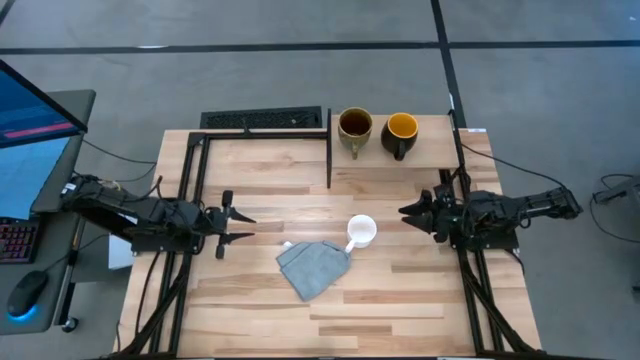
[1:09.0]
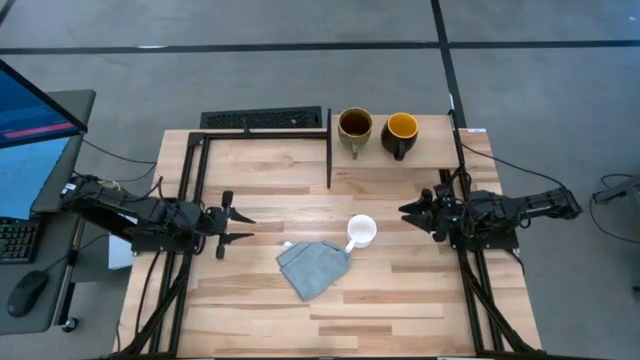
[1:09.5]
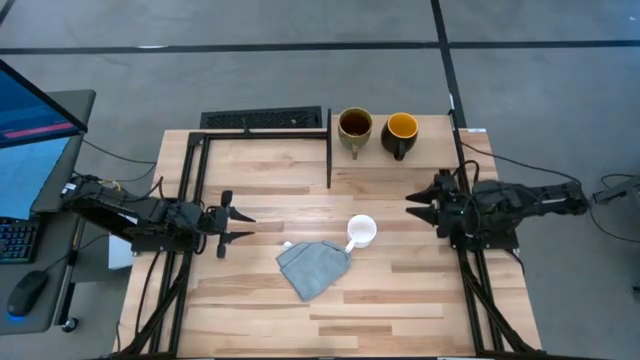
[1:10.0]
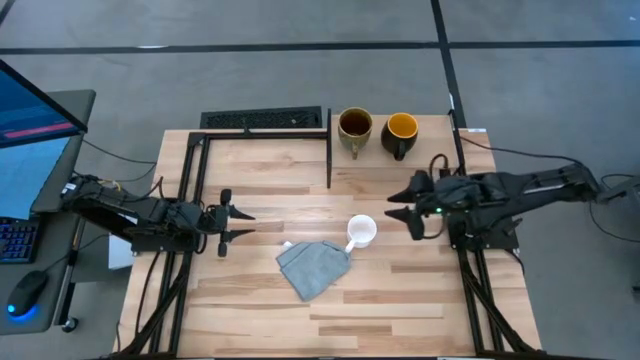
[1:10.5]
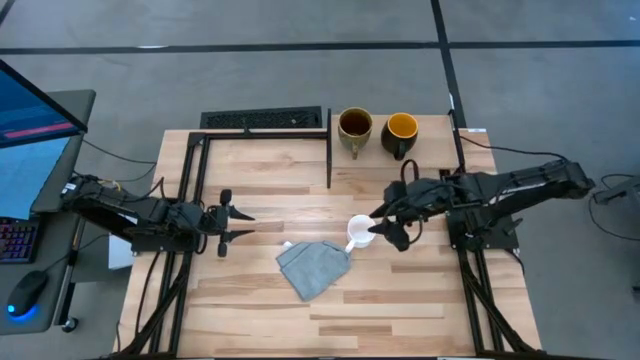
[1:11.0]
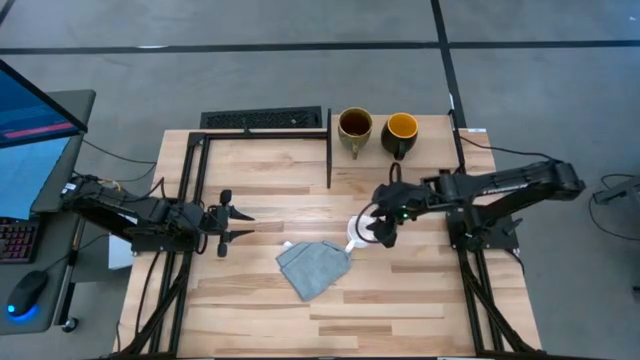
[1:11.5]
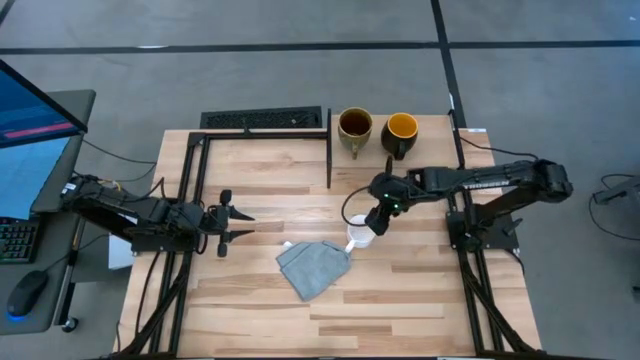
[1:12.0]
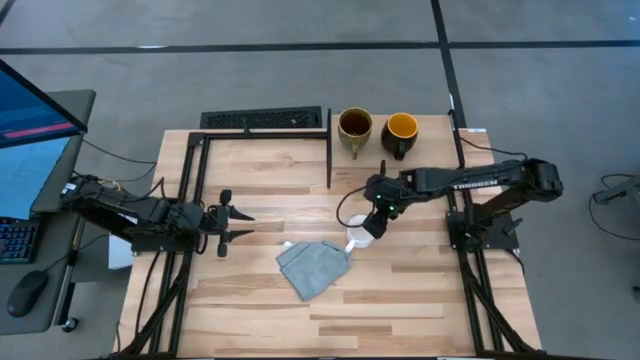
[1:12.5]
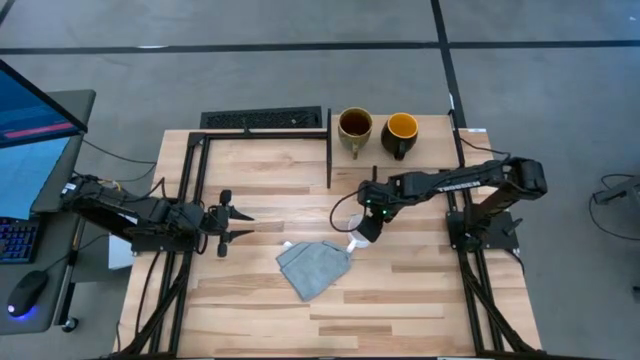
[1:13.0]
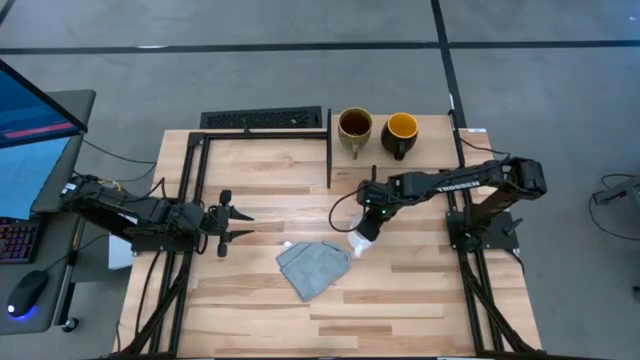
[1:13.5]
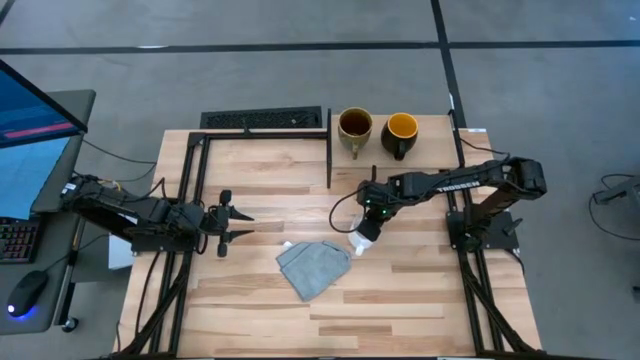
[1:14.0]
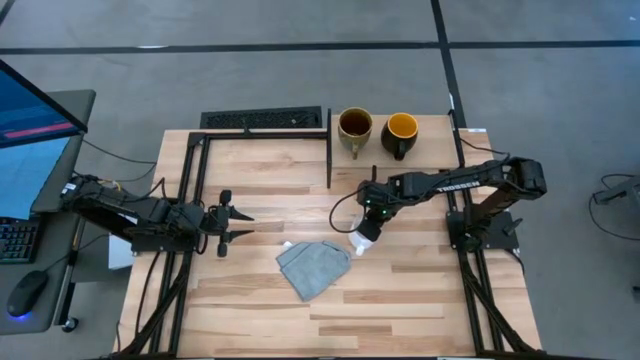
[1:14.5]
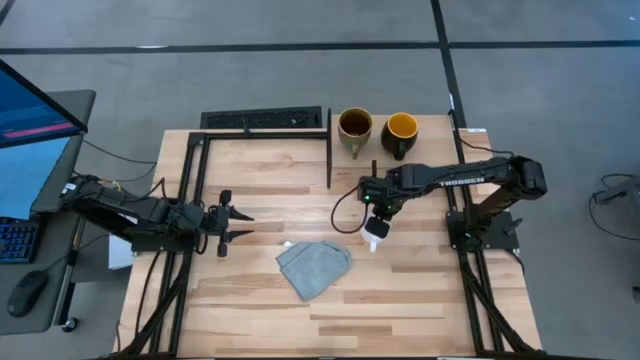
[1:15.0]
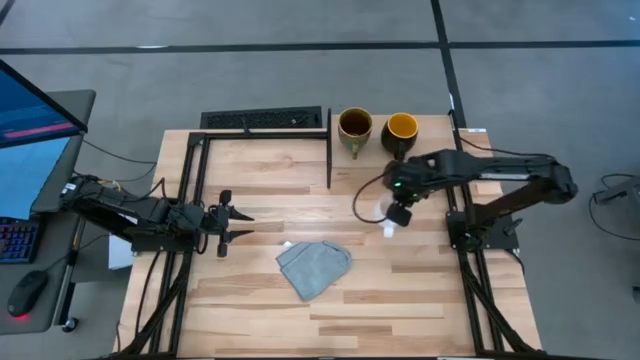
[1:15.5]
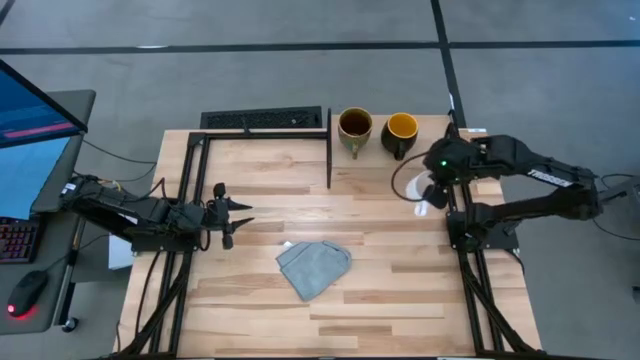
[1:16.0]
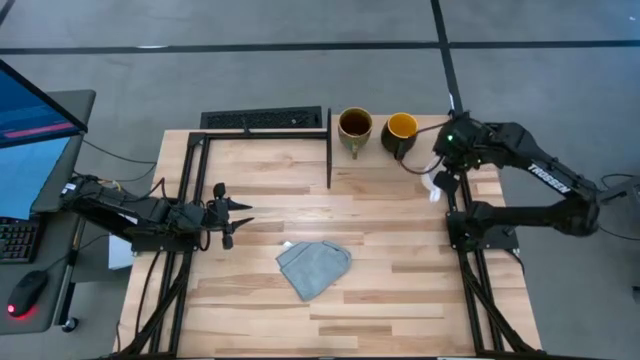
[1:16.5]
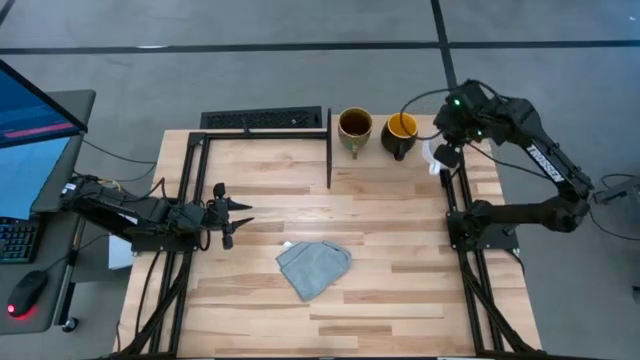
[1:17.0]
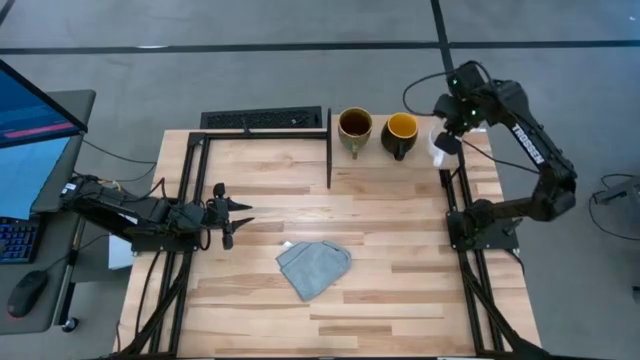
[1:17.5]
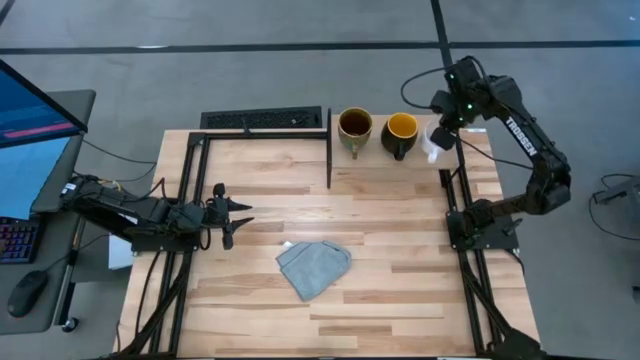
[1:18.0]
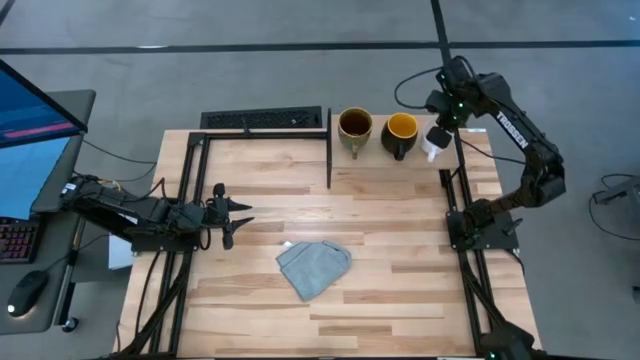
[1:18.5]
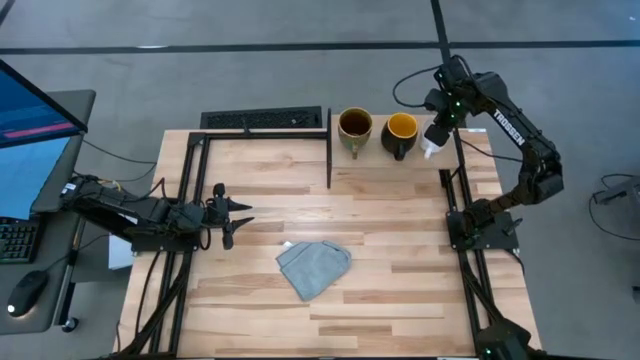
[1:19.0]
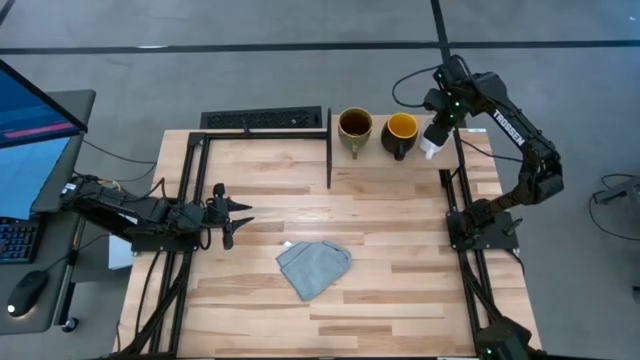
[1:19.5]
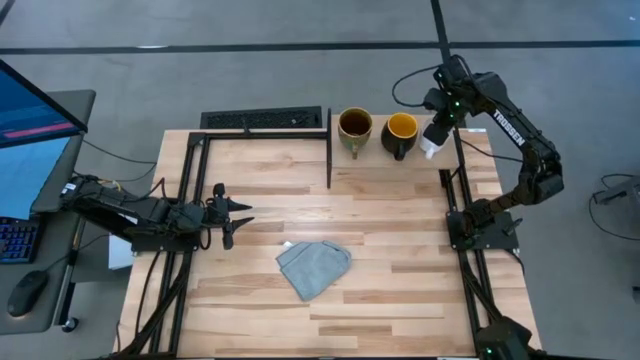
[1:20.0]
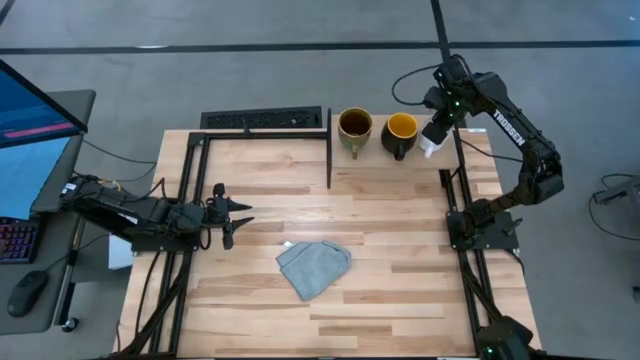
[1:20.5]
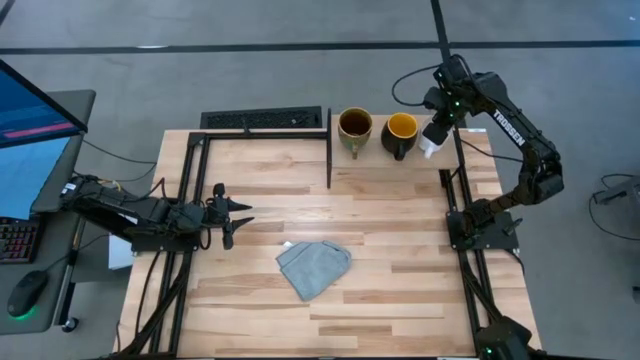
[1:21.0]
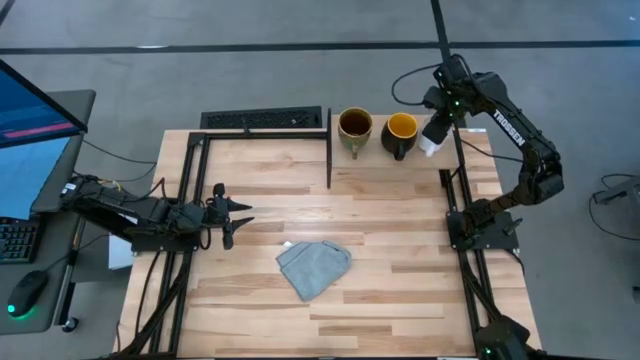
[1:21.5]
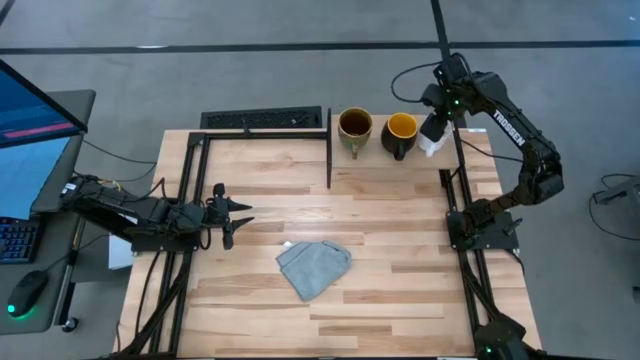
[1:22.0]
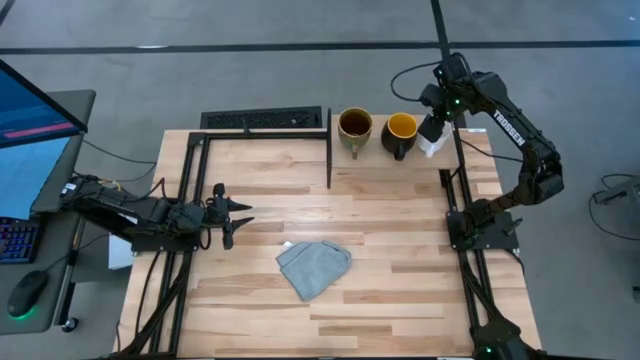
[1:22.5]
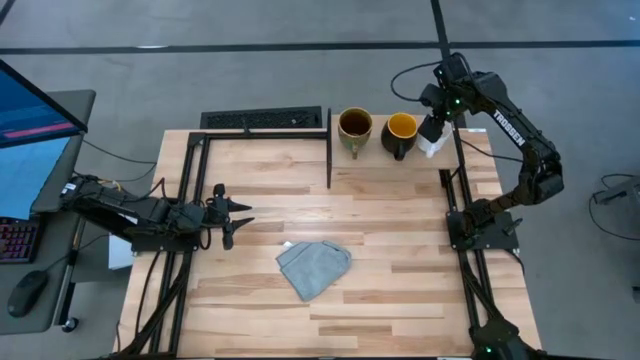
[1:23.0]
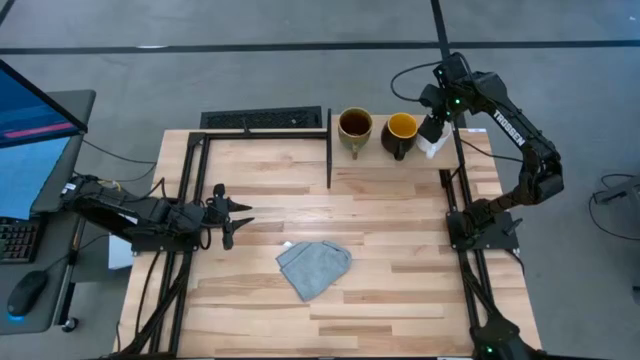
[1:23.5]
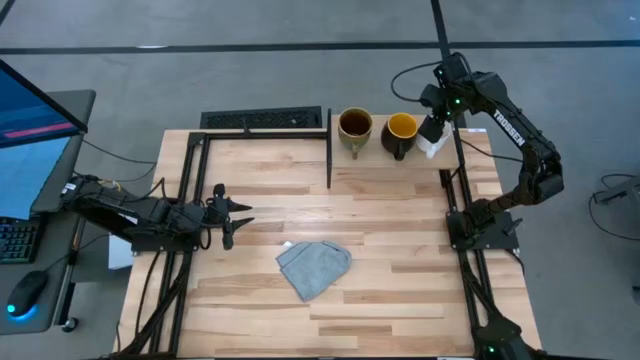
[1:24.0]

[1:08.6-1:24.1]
Task: Stack small to large cups/mugs on shelf
Put the white mug on the shelf

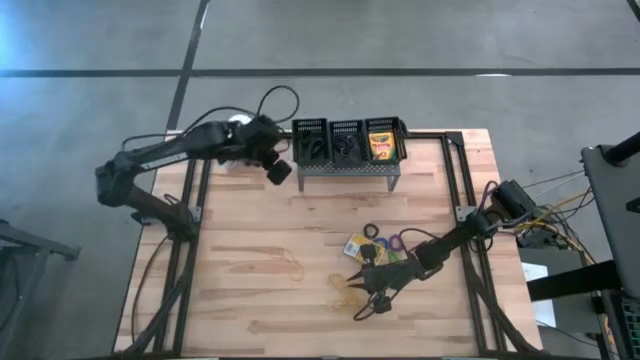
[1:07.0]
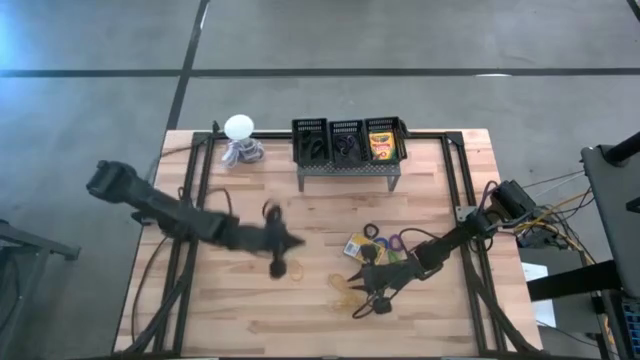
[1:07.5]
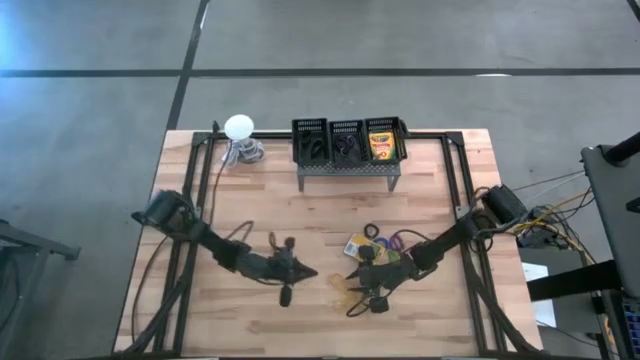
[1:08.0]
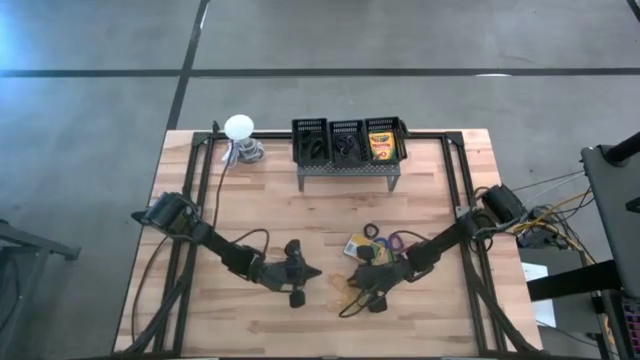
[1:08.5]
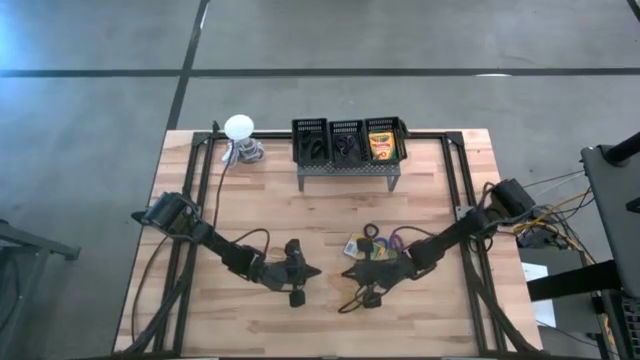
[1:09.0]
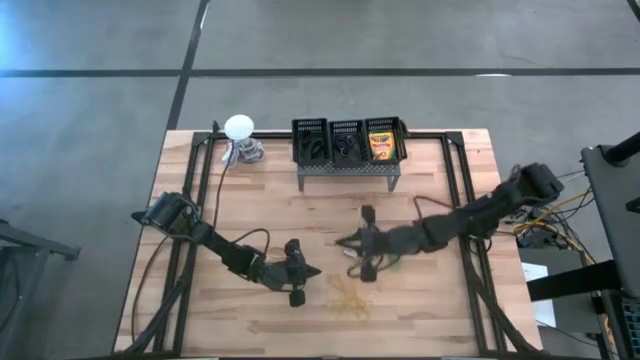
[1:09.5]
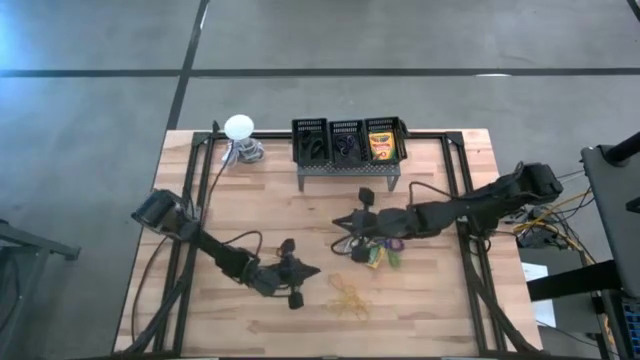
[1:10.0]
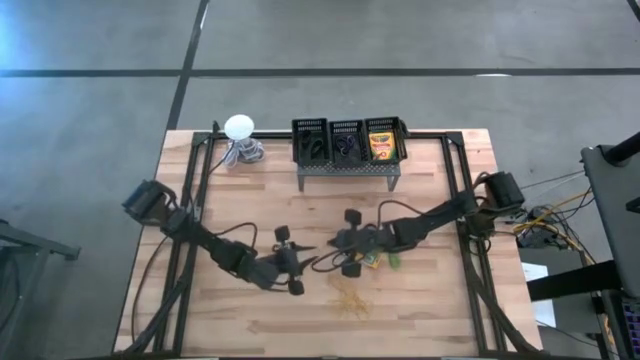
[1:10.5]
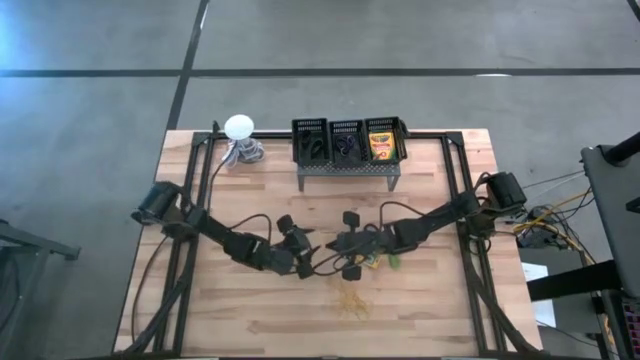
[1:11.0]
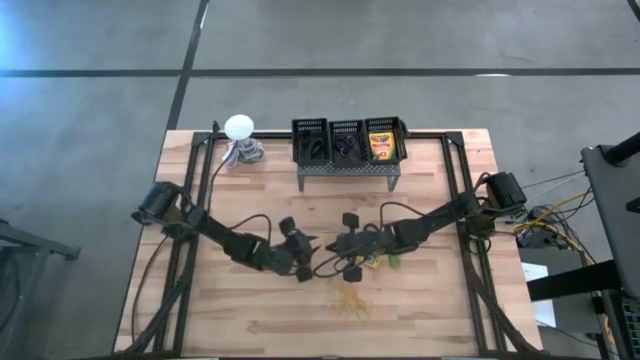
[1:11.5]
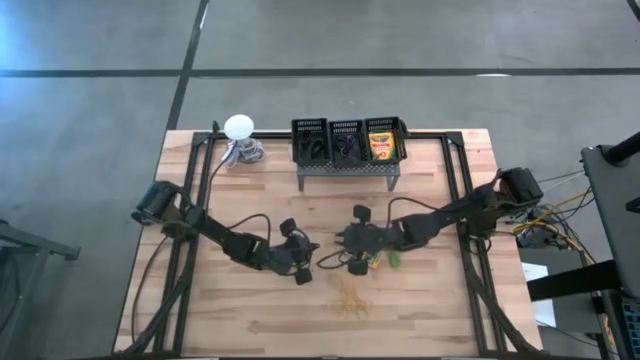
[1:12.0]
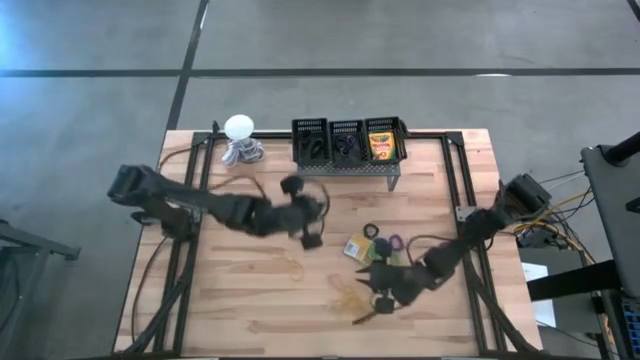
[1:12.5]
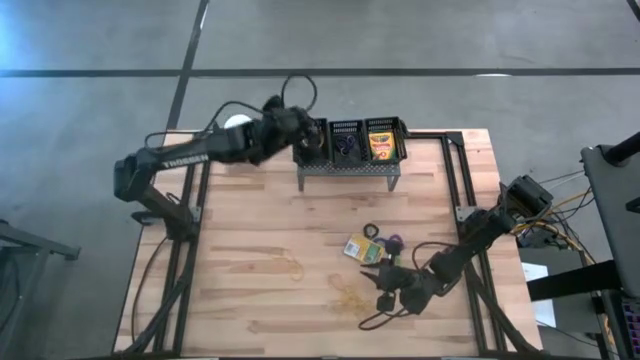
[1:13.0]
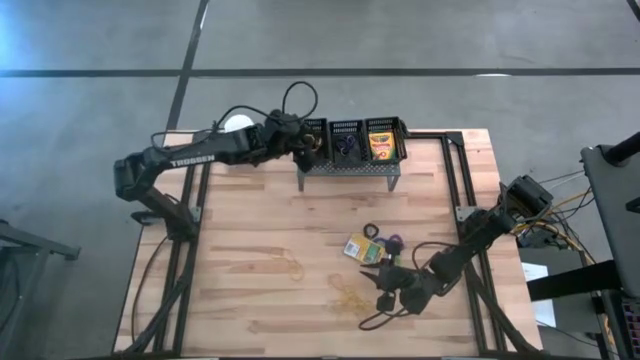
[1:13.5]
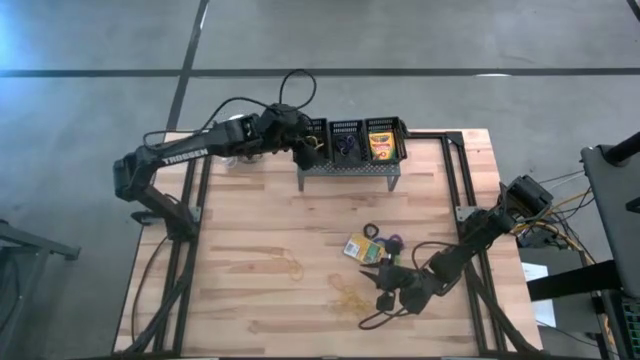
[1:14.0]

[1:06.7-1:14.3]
Task: Pick & Place Office Desk Supplies
Put the yellow rubber band into the left black bin on the shelf
